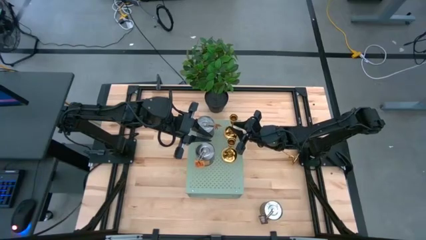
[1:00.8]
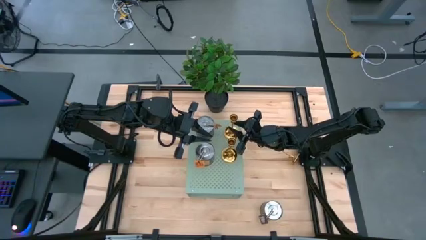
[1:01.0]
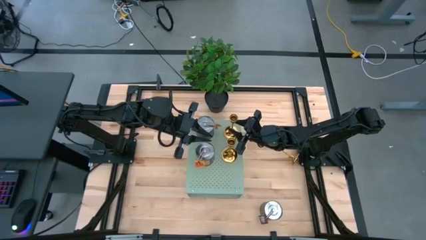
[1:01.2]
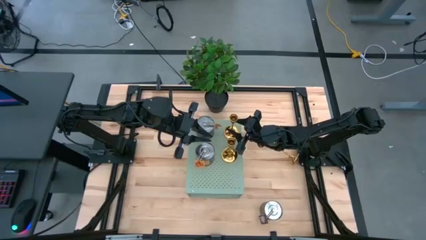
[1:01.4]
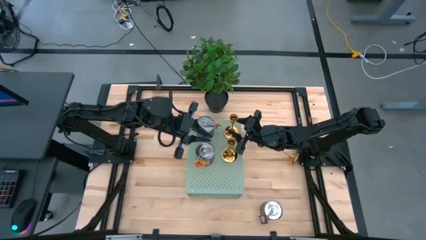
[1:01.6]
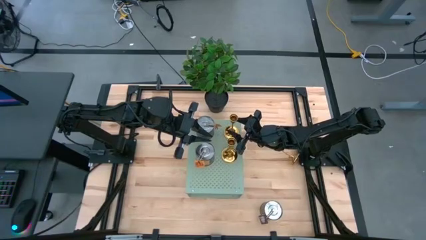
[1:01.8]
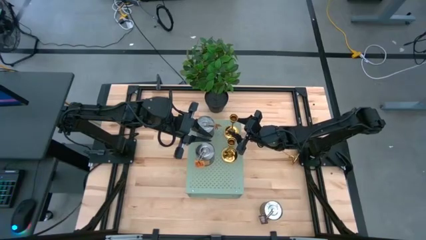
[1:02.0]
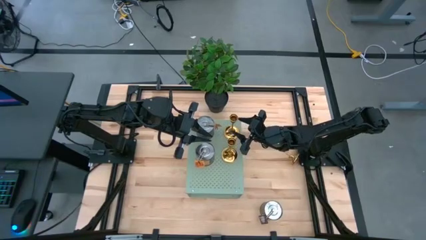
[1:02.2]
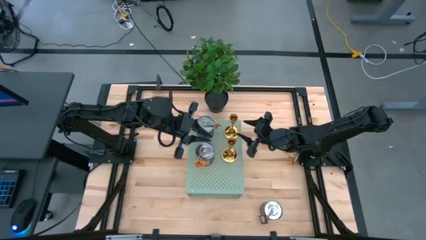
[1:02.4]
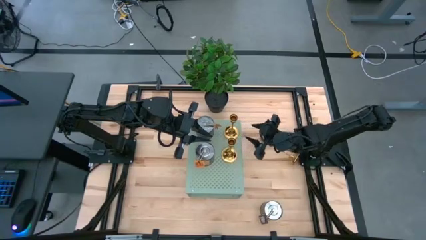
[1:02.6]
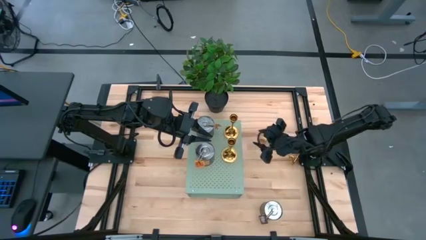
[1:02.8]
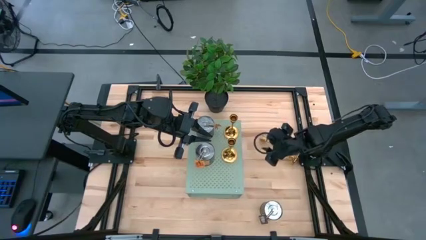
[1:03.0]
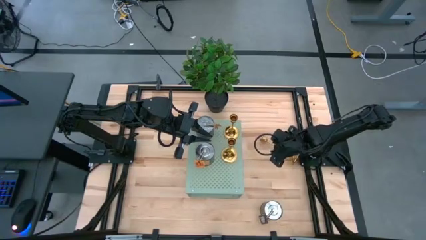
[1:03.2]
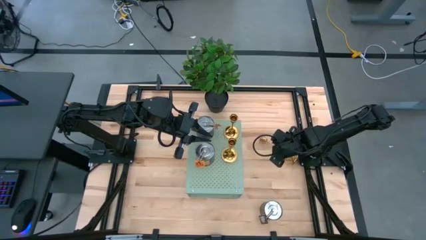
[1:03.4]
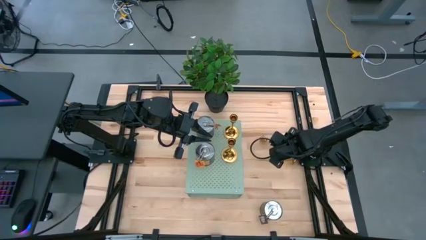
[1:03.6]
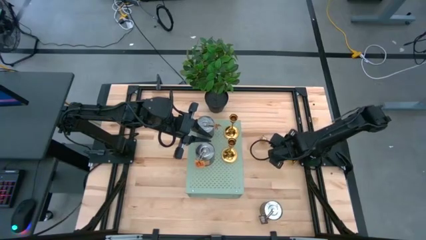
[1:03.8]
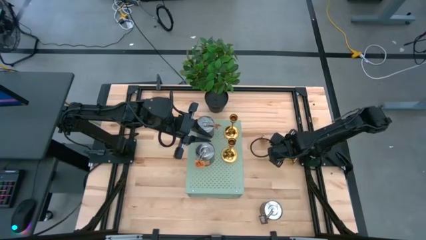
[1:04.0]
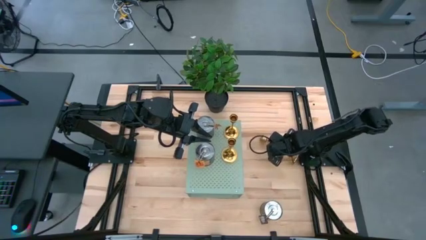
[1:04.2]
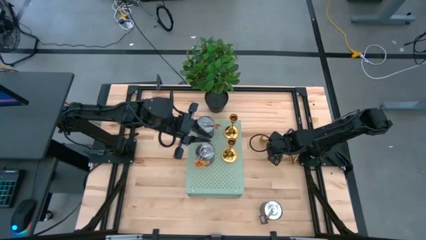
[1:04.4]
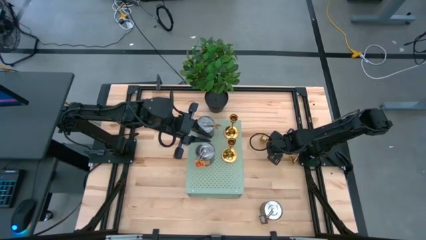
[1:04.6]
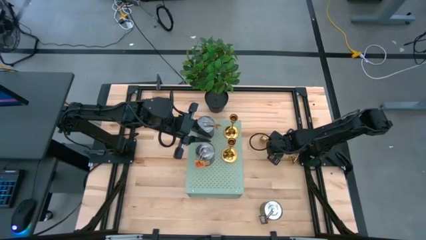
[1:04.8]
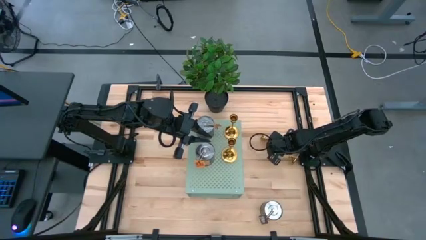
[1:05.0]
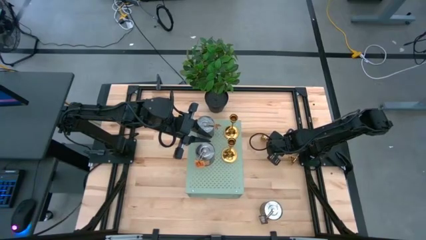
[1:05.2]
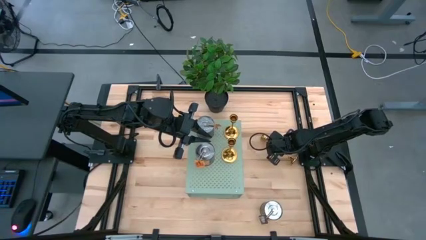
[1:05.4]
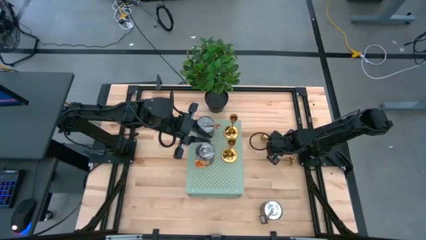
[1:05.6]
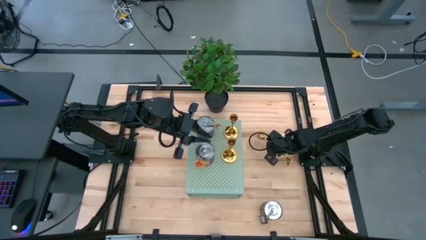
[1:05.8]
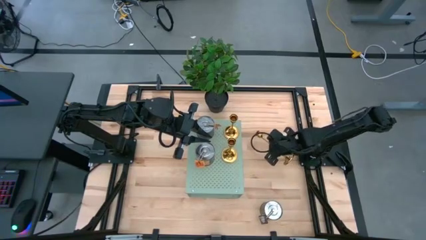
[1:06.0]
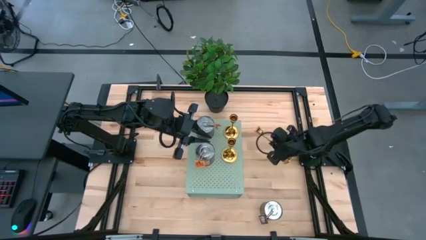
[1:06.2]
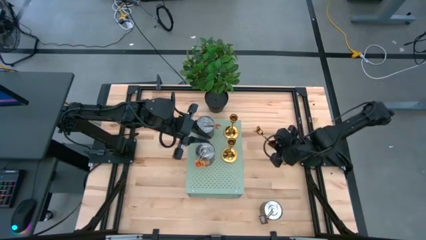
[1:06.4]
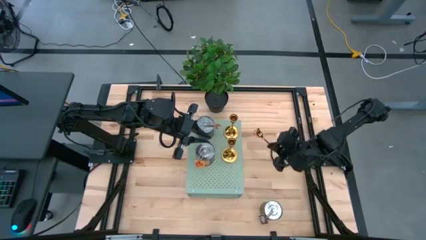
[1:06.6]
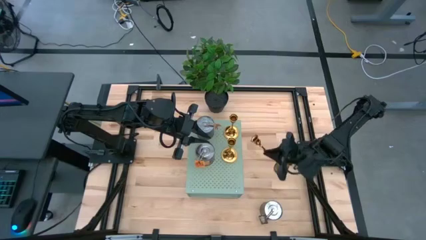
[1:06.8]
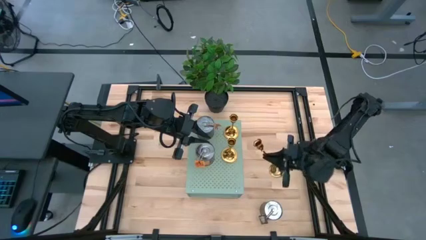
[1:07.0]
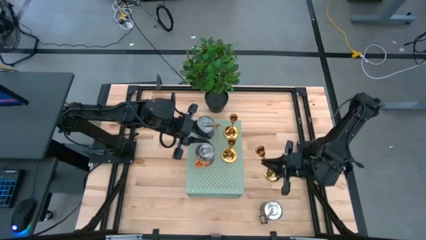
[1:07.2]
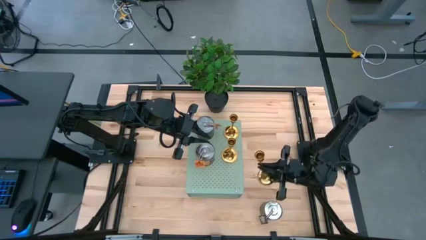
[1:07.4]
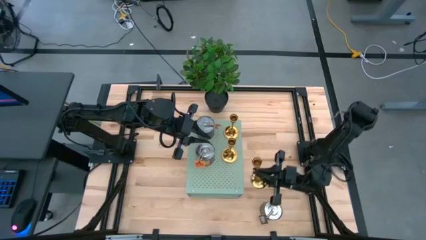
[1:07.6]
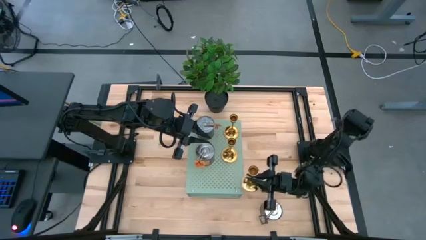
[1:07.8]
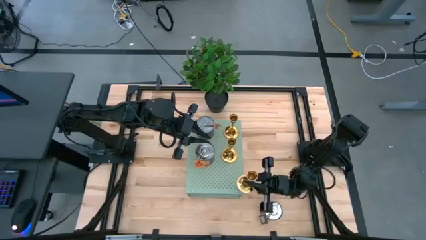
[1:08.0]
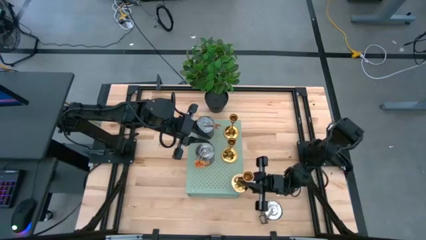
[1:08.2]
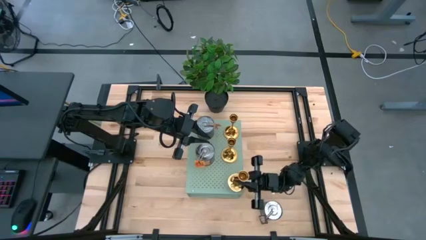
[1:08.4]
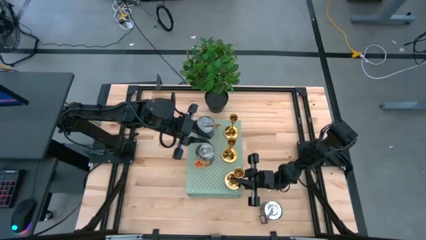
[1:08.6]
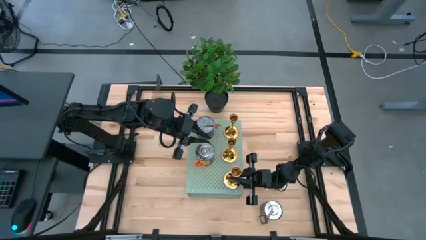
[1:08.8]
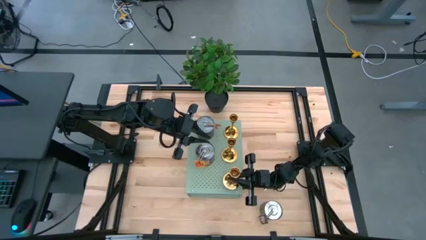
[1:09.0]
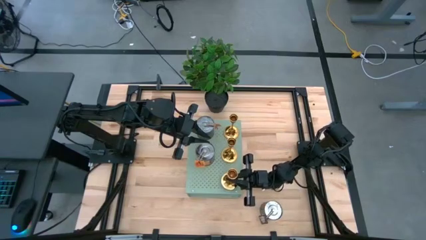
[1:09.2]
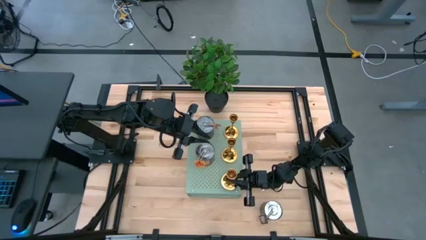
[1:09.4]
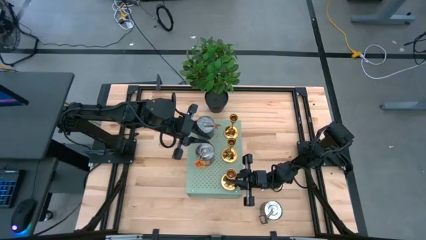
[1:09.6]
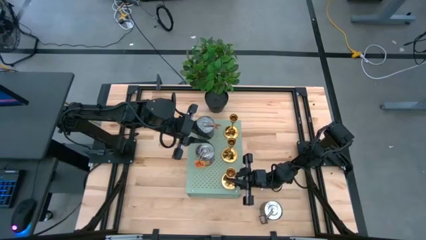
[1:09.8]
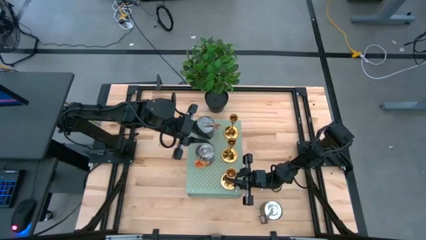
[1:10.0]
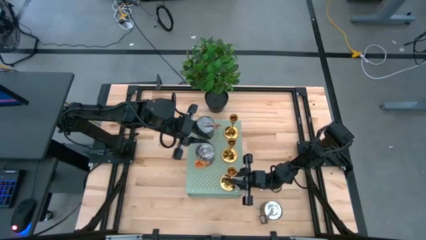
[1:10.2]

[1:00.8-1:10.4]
Task: Pick & Place candle stick holders
Align the gold candle holder with the other gold candle holder on the shelf

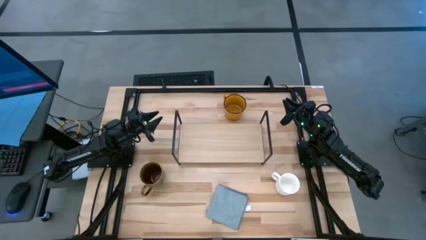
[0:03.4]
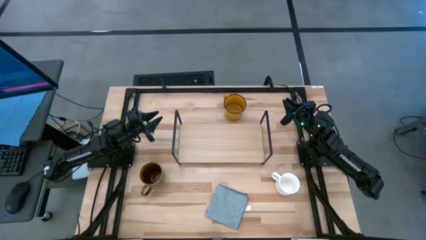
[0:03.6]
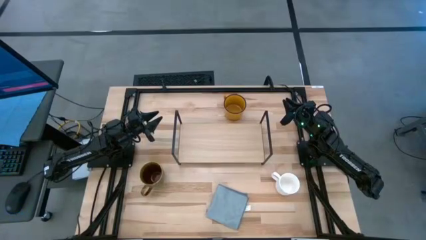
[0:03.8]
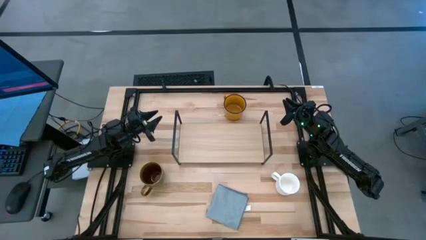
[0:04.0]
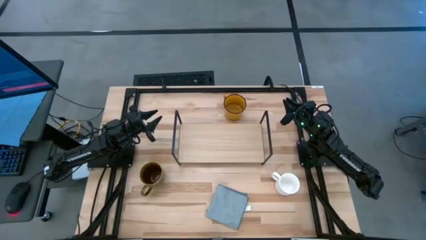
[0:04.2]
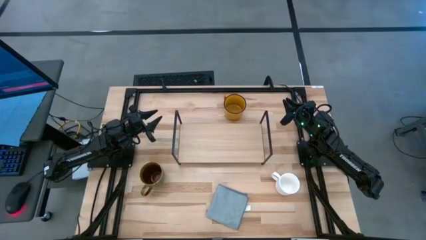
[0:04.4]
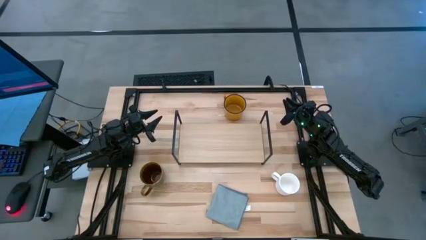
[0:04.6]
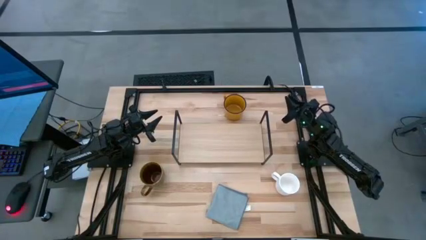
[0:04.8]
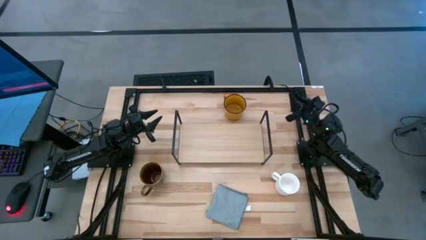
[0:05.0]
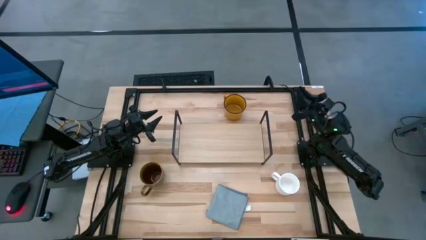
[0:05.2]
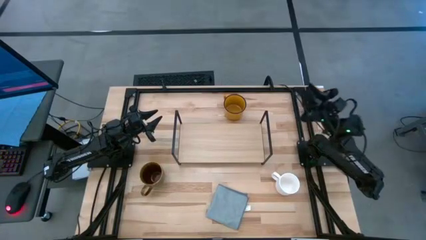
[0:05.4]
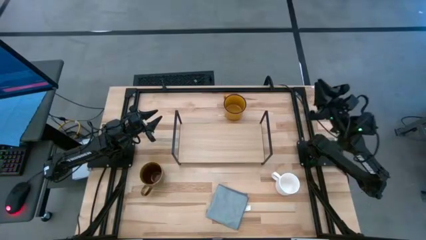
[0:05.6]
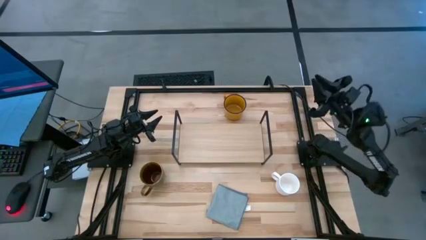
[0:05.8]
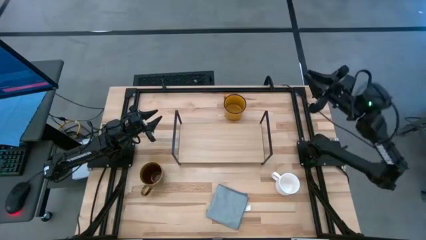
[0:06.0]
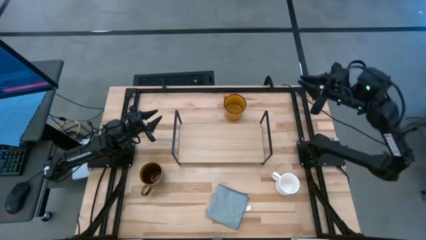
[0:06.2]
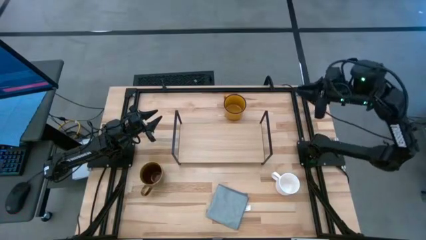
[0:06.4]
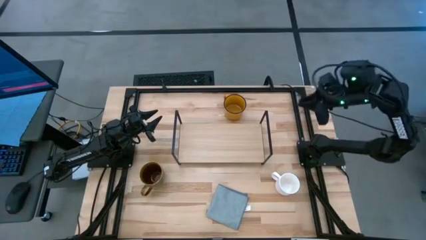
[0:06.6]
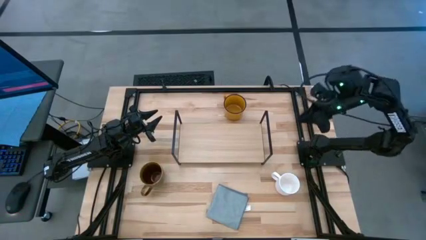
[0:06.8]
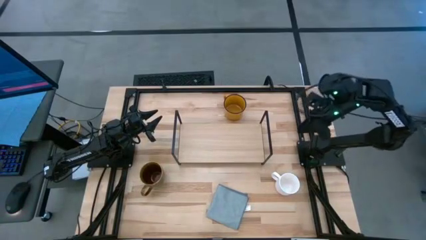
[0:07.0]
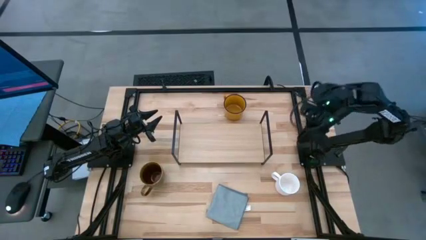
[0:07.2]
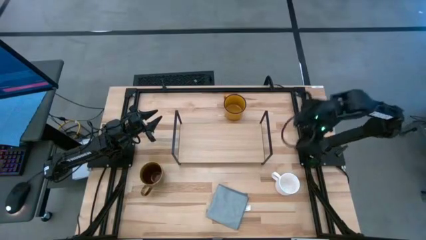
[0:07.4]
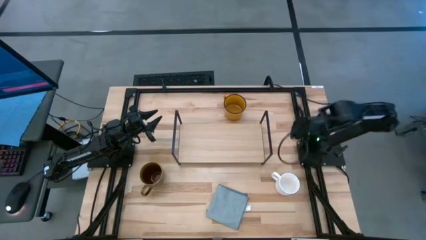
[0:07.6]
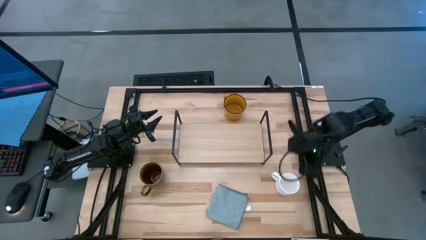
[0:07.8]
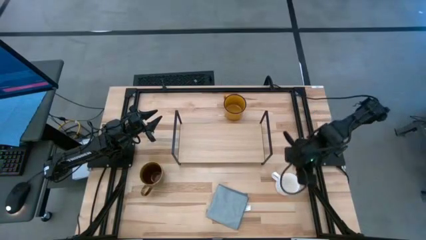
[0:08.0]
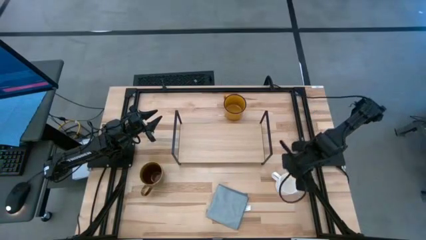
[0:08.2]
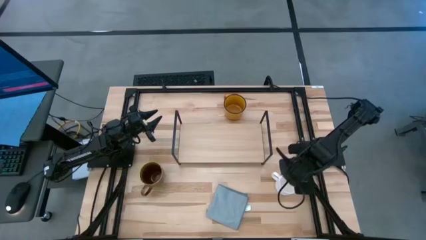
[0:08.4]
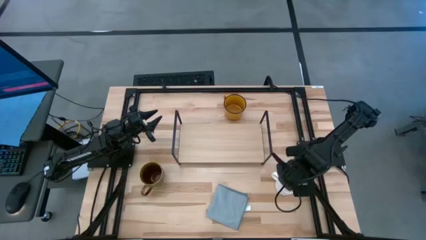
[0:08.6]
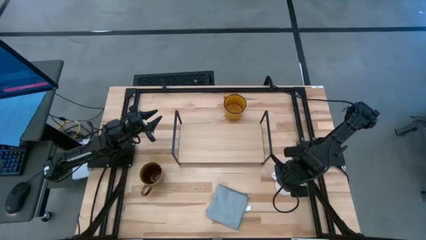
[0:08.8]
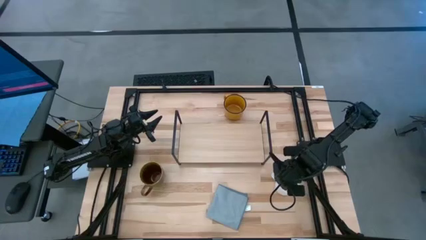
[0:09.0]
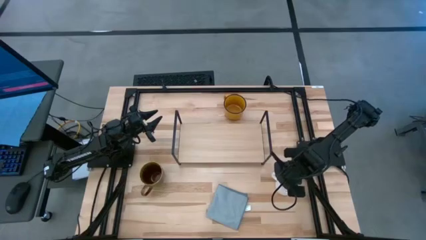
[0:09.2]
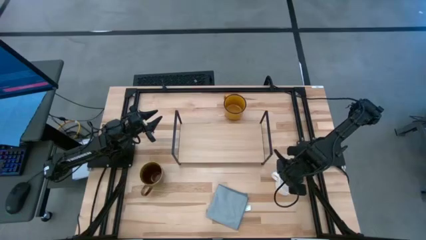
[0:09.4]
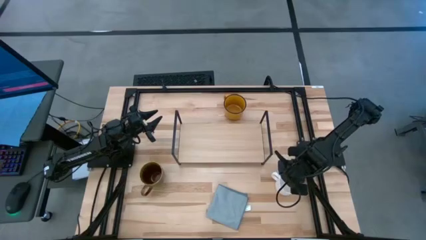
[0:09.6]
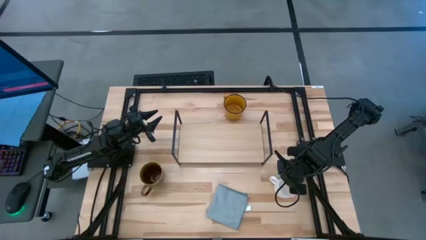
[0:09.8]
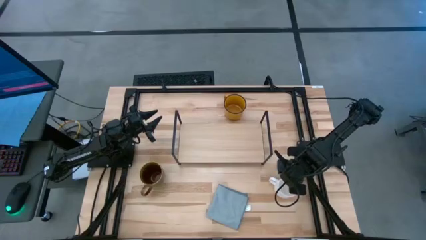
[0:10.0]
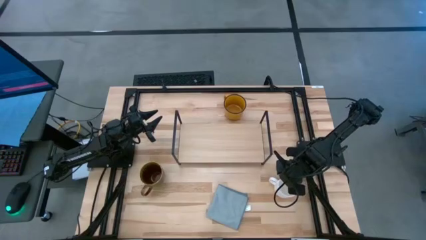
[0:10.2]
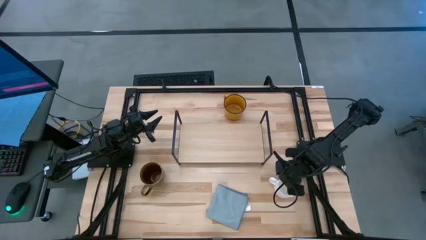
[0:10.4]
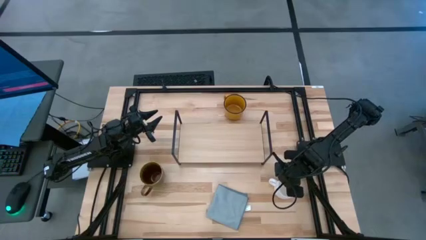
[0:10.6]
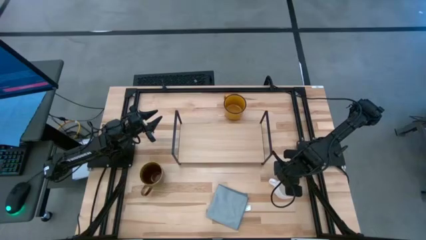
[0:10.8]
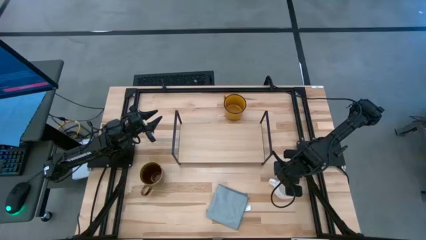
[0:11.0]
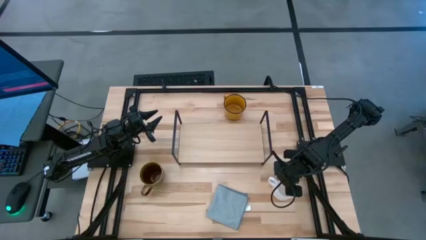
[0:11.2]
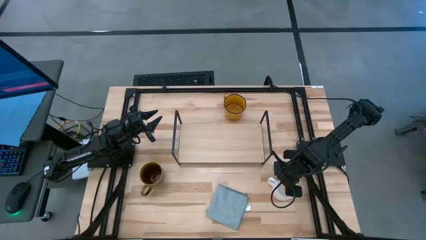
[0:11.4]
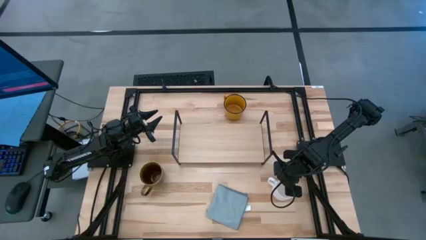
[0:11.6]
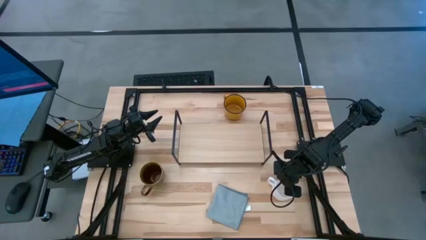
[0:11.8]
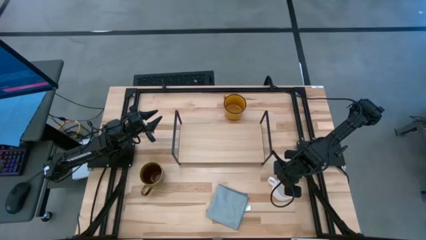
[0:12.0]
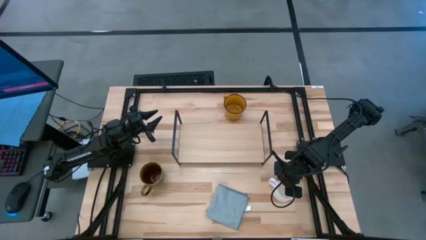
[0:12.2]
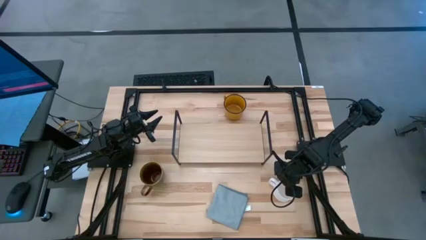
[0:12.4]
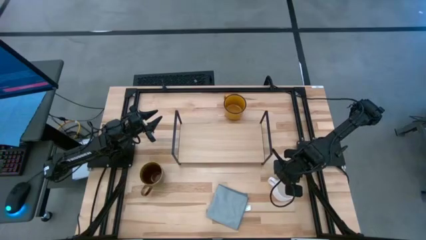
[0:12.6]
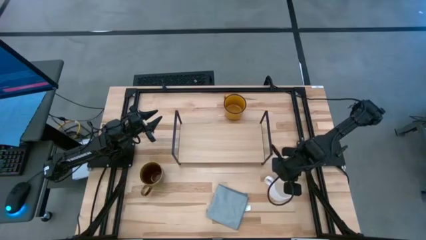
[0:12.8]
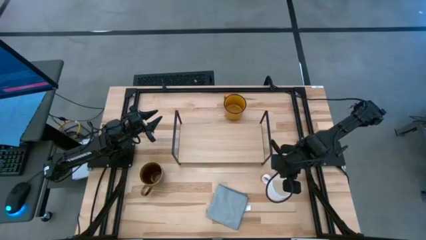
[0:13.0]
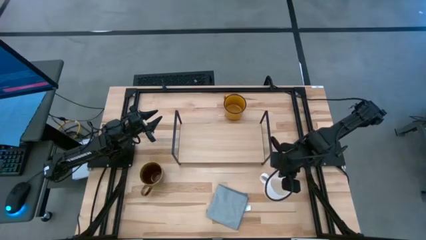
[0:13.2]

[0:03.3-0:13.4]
Task: Stack small to large cups/mugs on shelf
Put the white cup on the shelf
